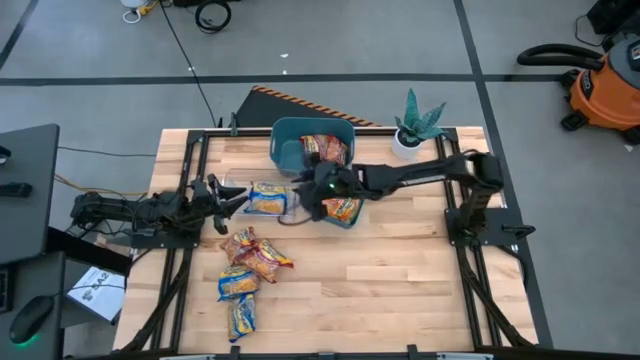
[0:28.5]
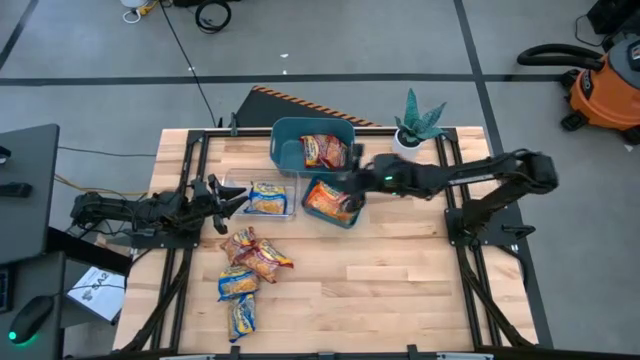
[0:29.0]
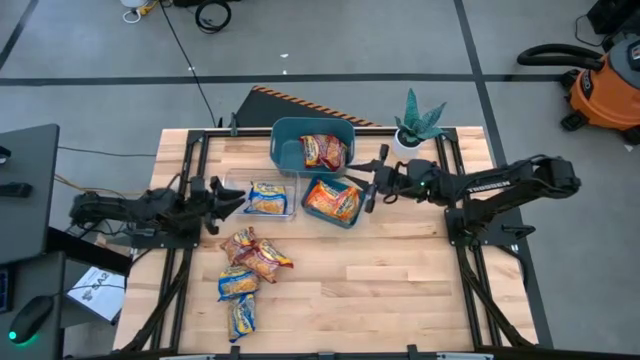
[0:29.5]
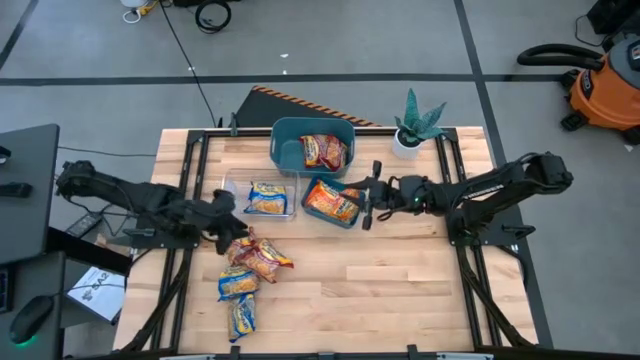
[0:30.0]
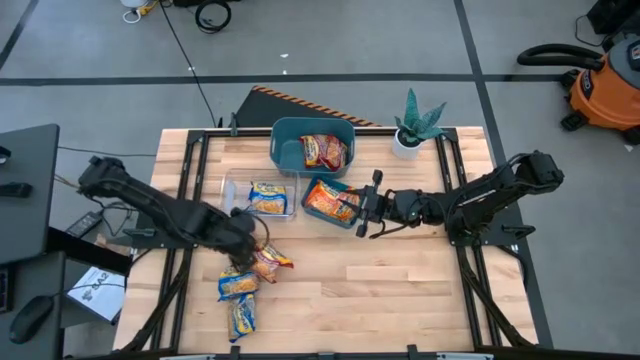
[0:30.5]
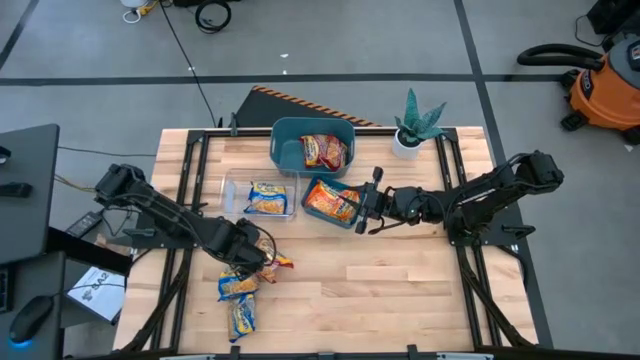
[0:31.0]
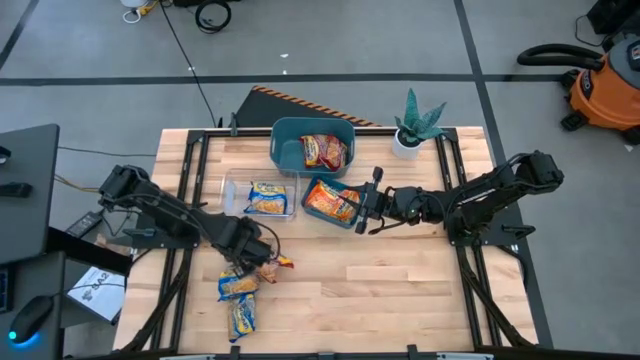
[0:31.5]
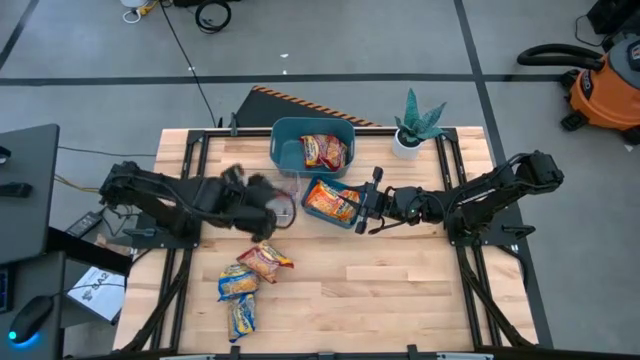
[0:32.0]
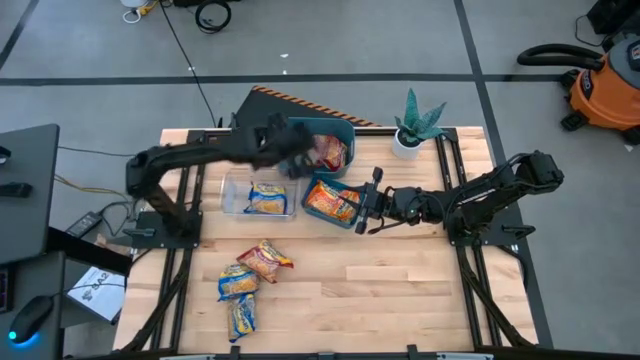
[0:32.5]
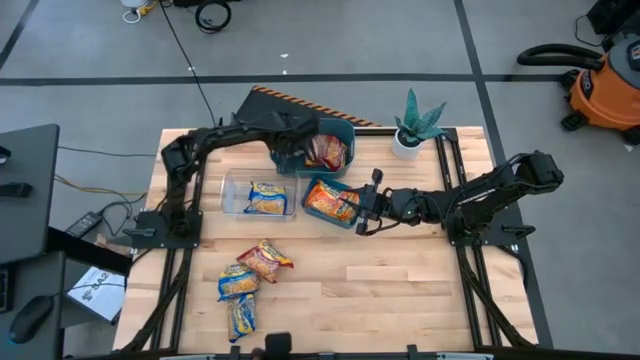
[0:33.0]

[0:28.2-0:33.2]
Task: Sort Maruchan noodles
Put the red noodle pack into the green bin

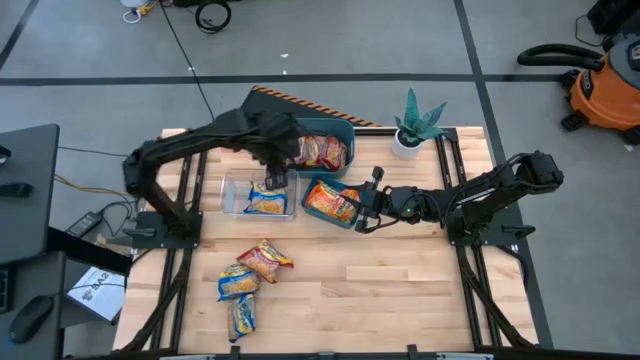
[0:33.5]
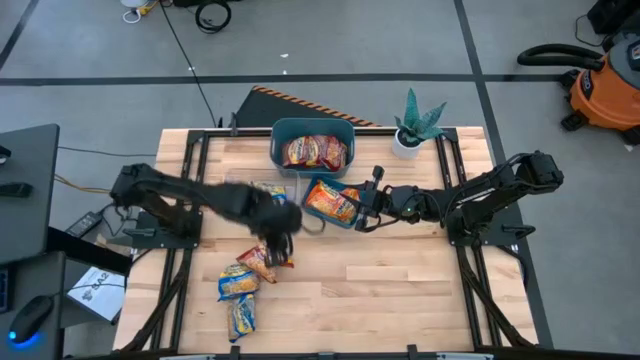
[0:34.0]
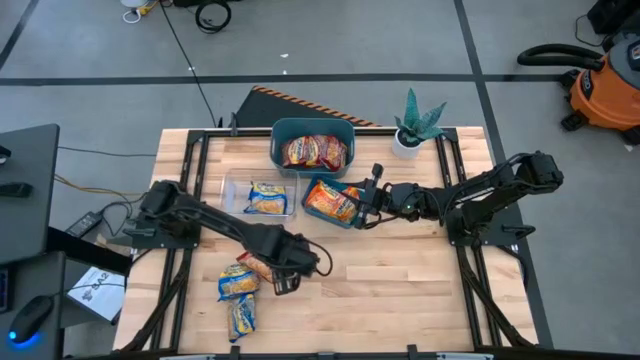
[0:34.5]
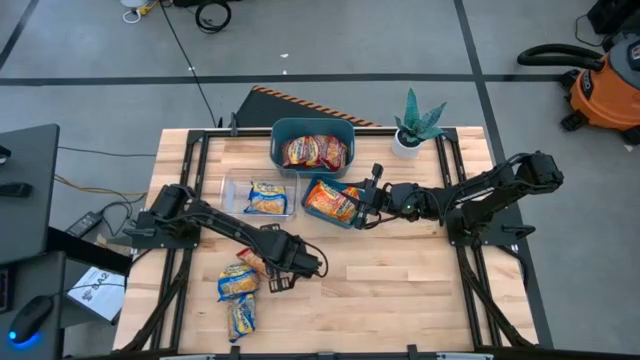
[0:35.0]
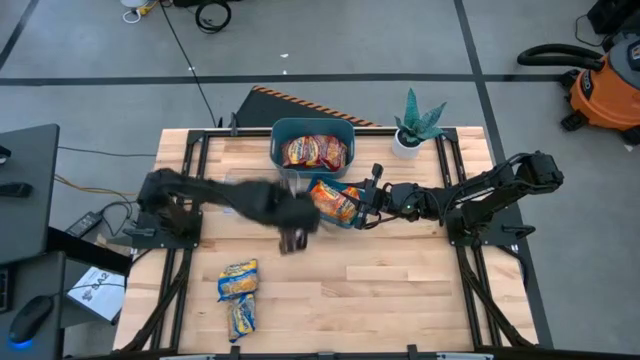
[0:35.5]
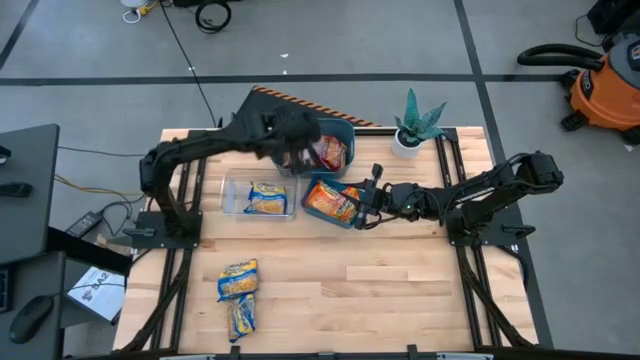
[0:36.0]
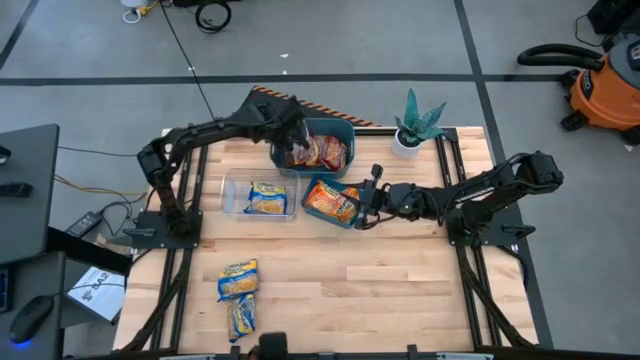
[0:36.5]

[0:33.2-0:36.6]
Put the red noodle pack into the green bin

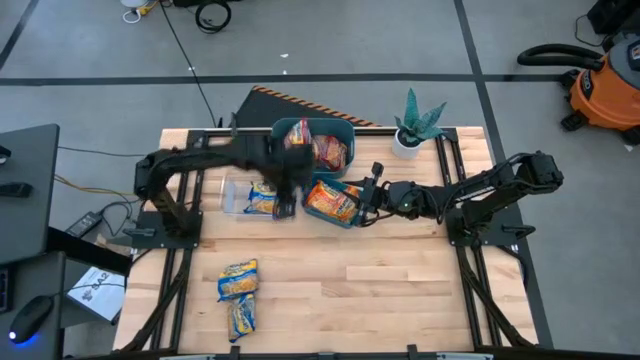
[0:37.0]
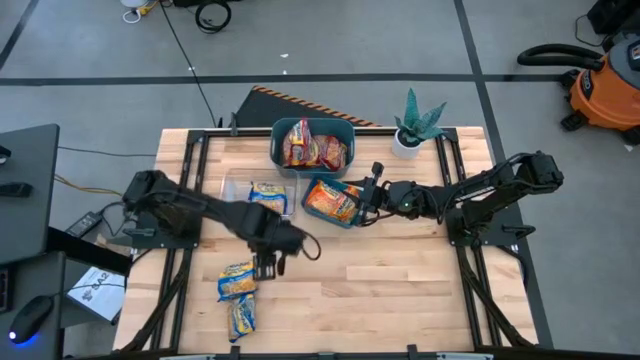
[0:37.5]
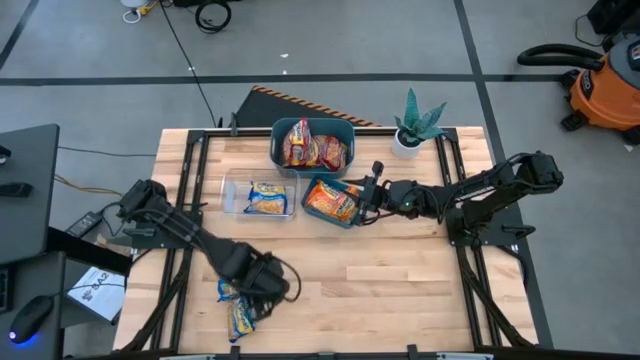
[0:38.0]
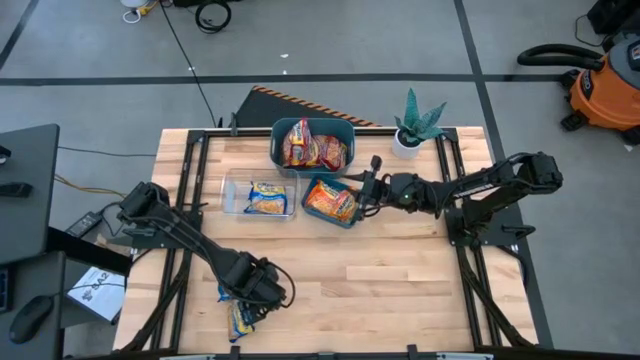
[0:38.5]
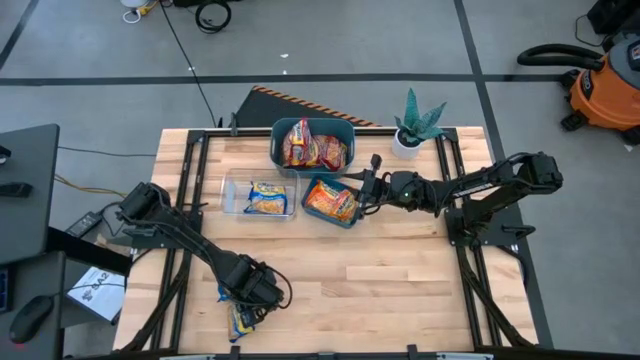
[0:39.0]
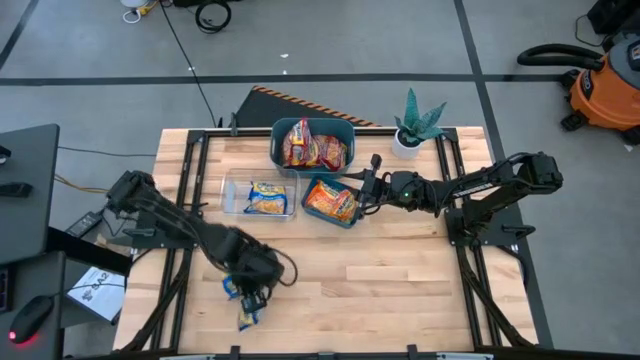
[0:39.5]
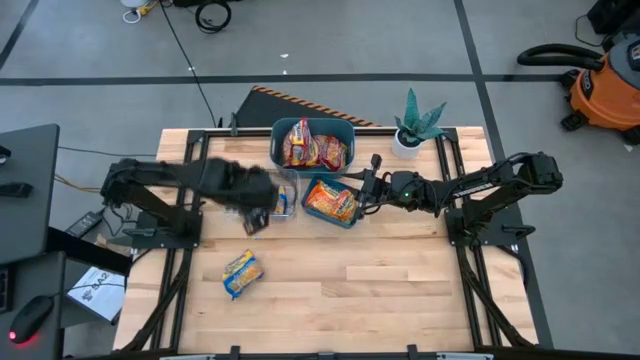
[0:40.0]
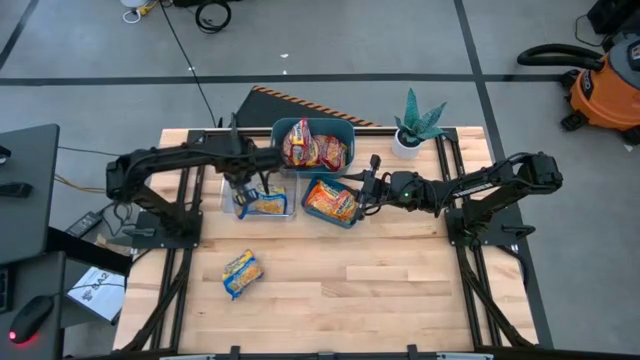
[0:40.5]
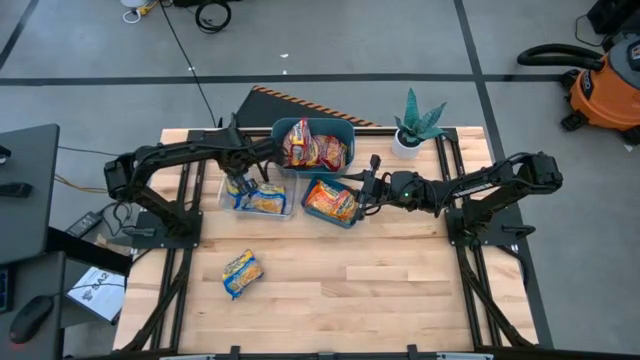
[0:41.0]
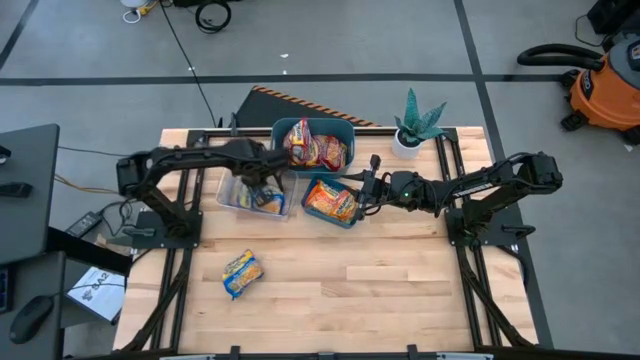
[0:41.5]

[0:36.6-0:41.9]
Put the blue noodle pack into the transparent bin

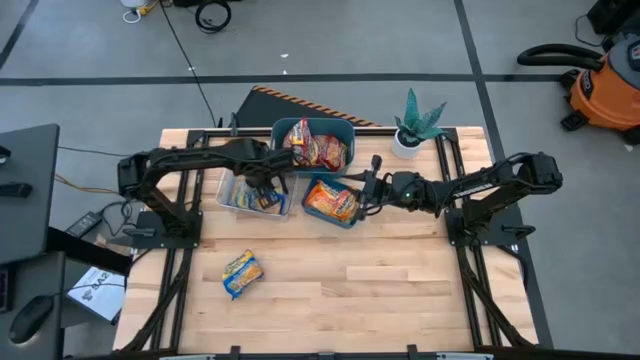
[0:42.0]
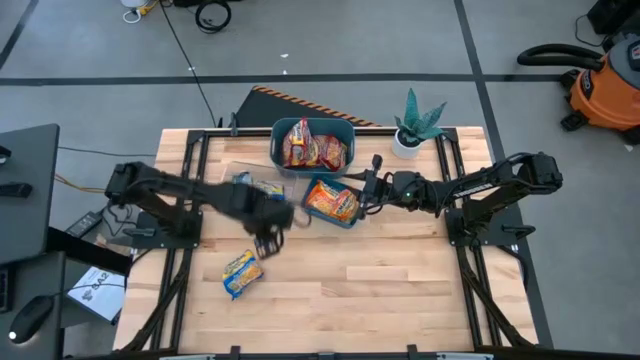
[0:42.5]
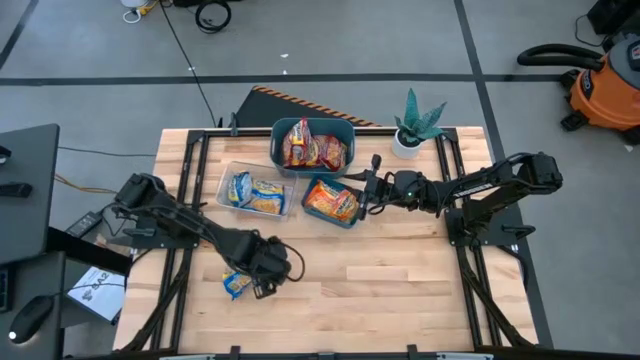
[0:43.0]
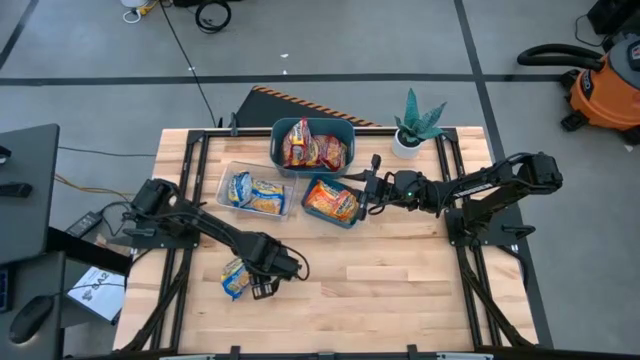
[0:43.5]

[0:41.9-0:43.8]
Put the blue noodle pack into the transparent bin

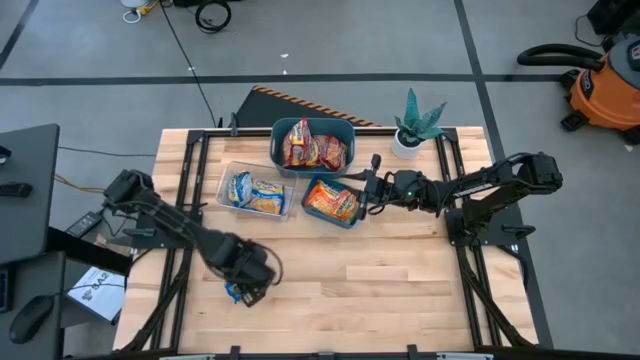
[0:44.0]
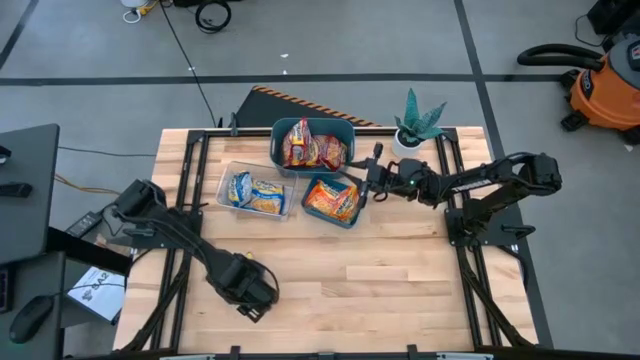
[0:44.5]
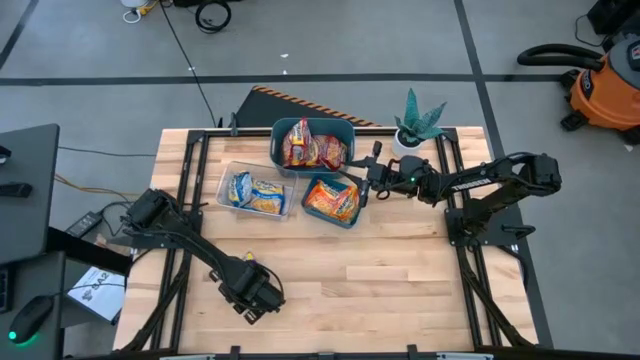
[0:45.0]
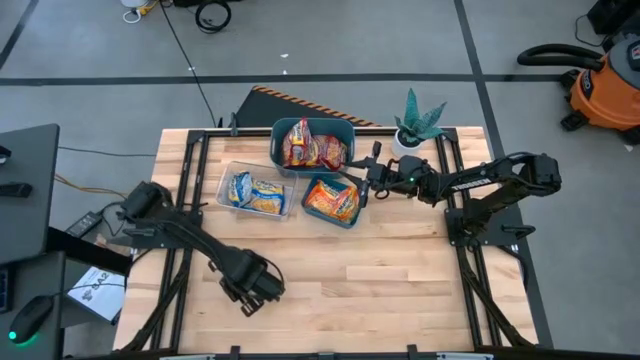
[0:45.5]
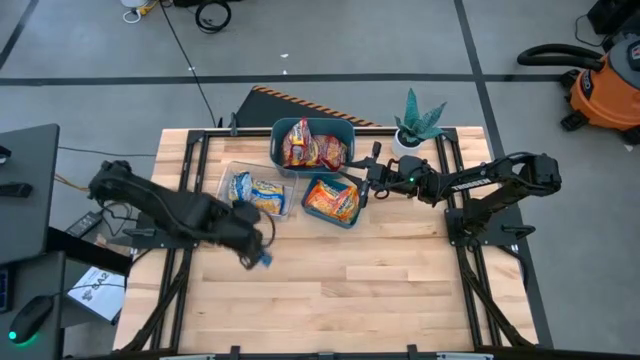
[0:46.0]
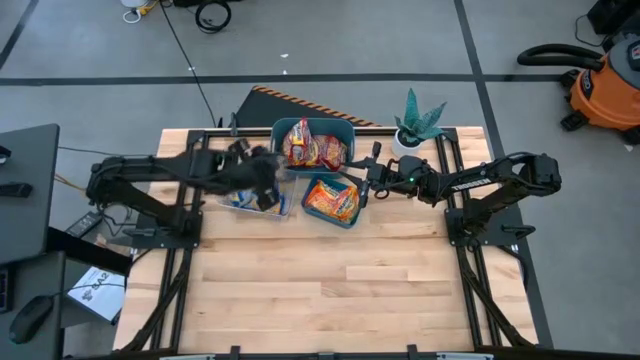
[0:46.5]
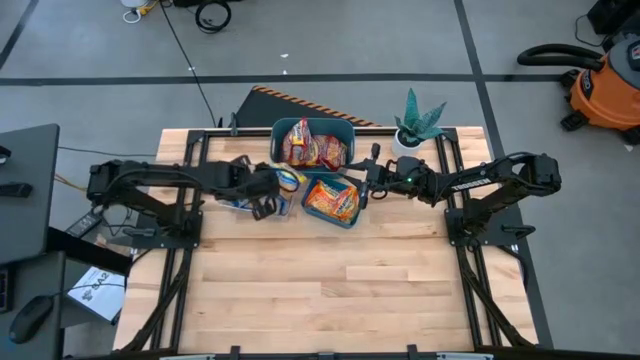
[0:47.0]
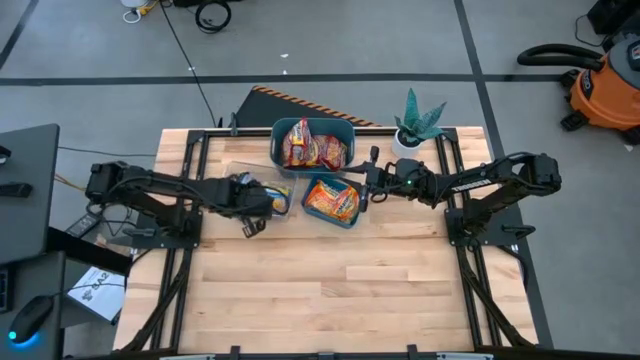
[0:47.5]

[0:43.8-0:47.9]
Put the blue noodle pack into the transparent bin

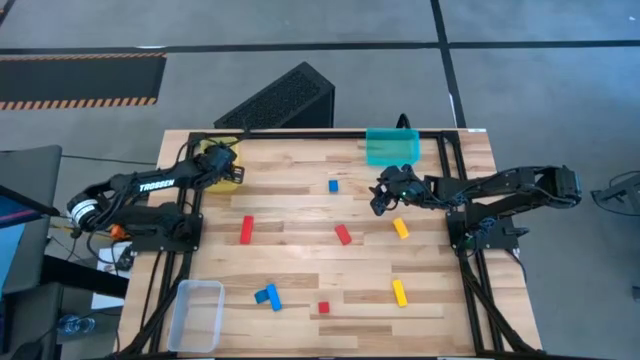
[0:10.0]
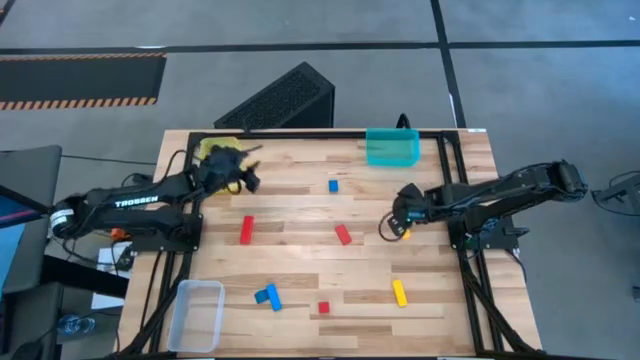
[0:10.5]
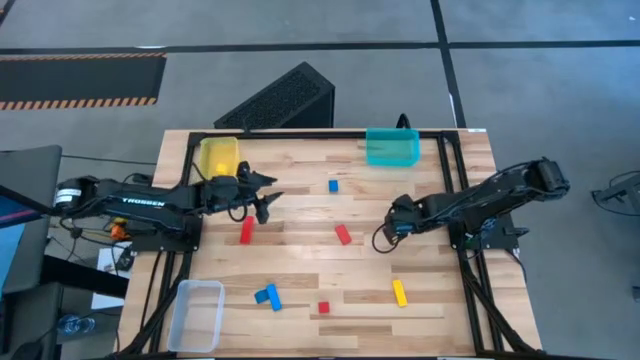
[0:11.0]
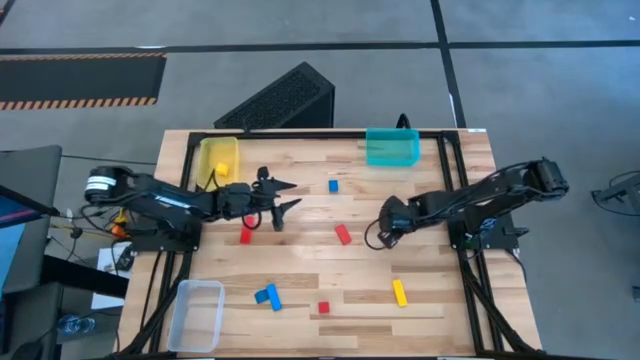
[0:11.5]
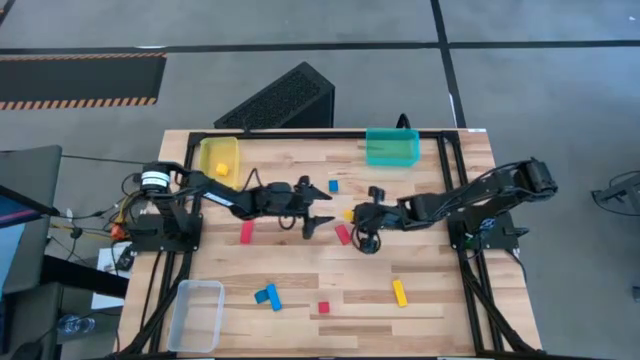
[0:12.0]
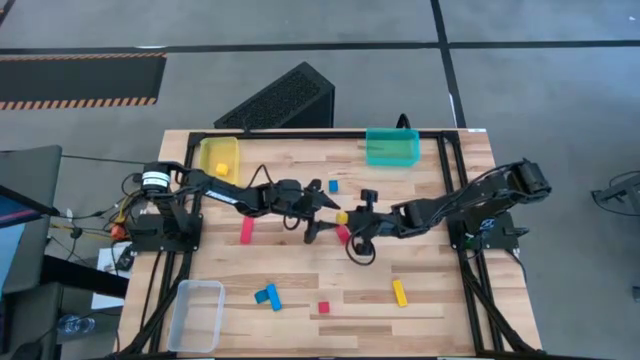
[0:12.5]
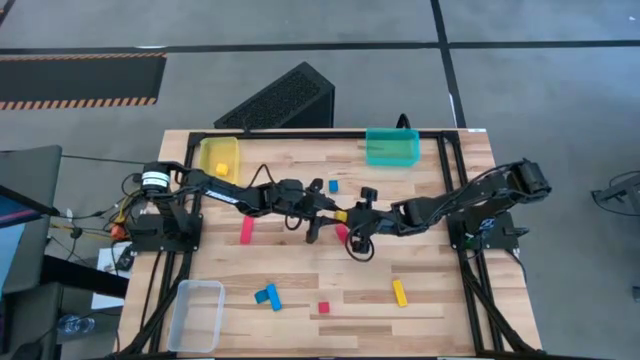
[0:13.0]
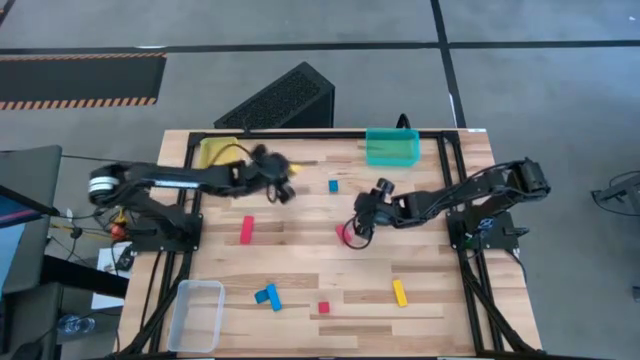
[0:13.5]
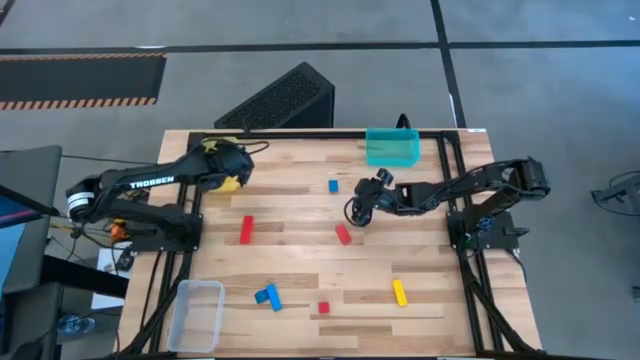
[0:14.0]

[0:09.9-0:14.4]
Task: Sort & place blocks by color
Put the top yellow block into the yellow bin
